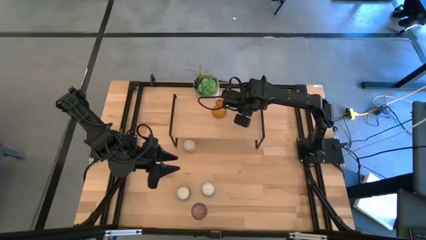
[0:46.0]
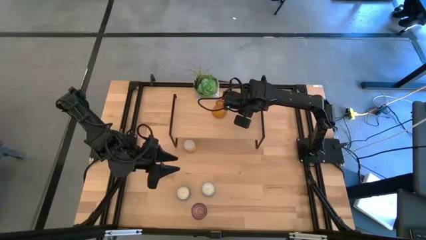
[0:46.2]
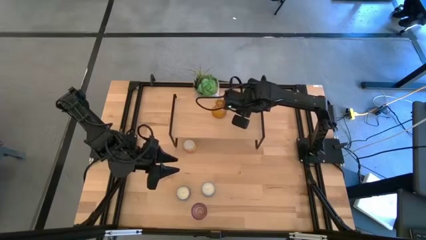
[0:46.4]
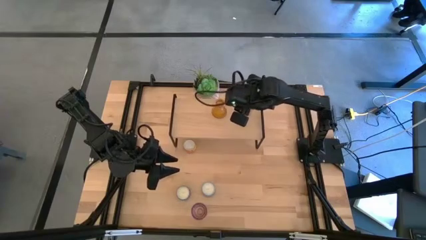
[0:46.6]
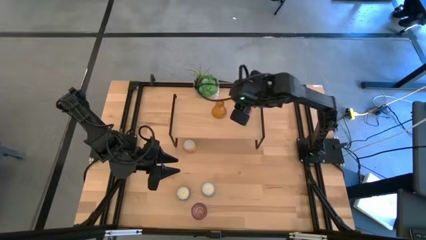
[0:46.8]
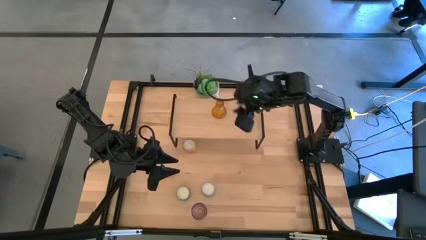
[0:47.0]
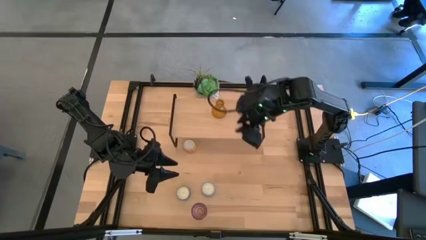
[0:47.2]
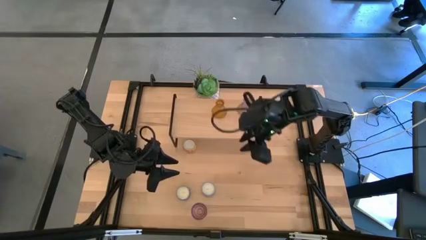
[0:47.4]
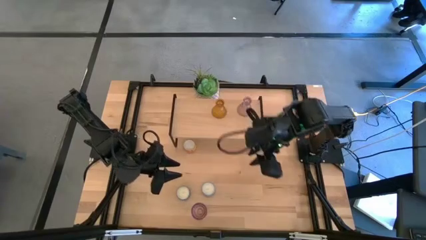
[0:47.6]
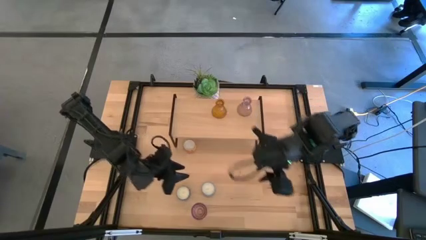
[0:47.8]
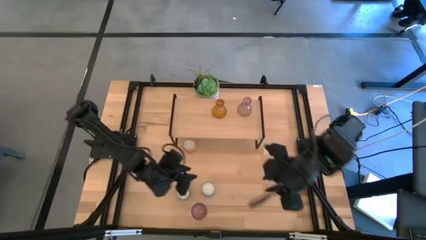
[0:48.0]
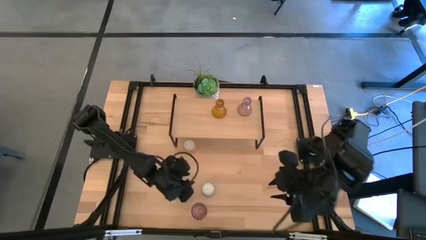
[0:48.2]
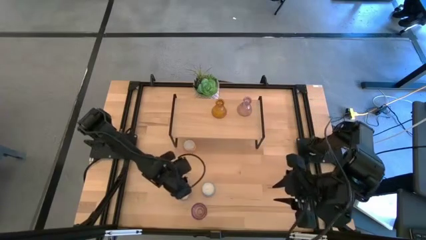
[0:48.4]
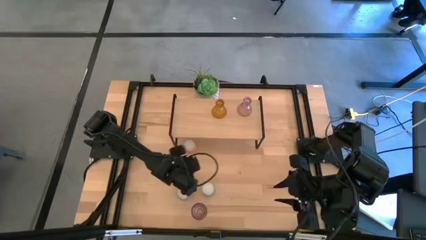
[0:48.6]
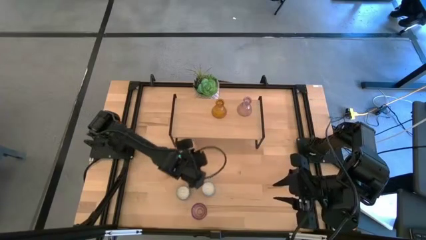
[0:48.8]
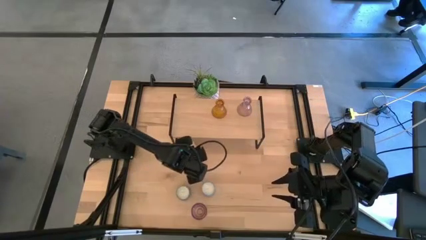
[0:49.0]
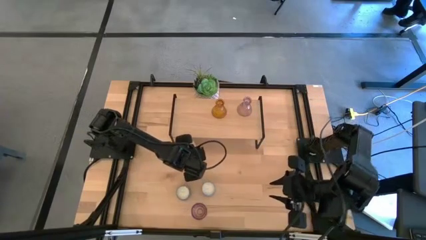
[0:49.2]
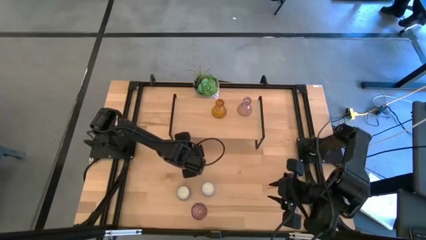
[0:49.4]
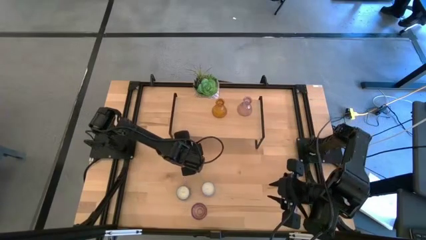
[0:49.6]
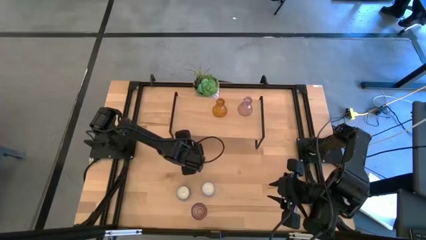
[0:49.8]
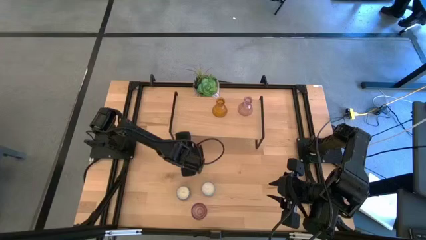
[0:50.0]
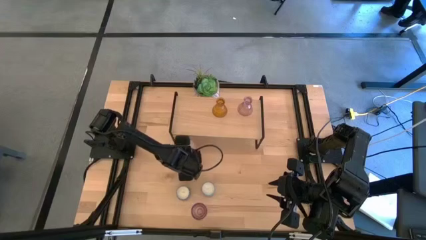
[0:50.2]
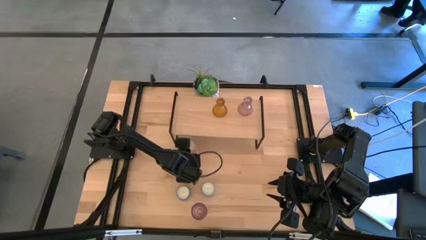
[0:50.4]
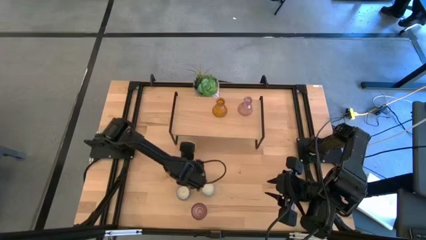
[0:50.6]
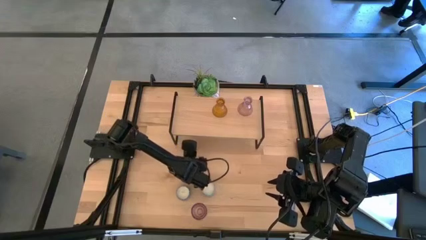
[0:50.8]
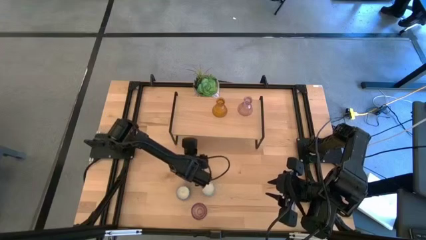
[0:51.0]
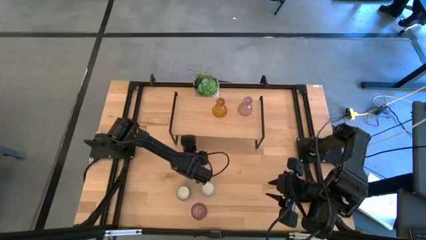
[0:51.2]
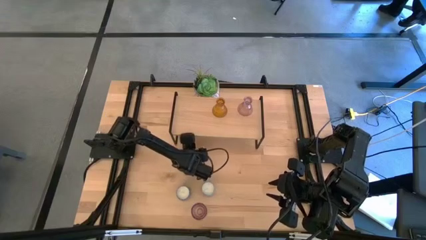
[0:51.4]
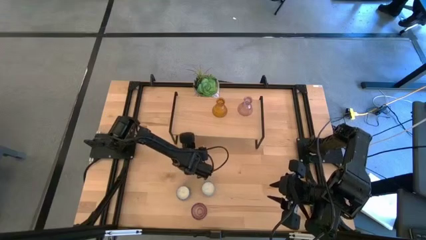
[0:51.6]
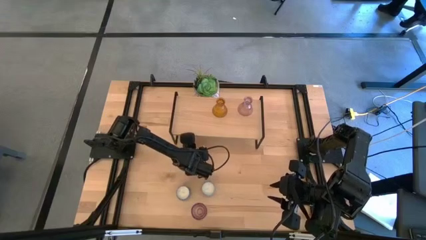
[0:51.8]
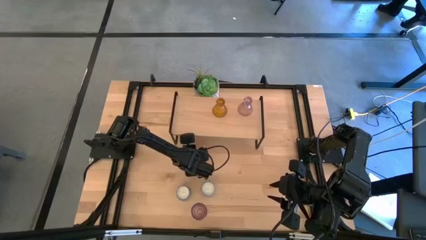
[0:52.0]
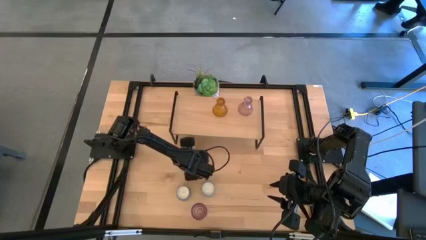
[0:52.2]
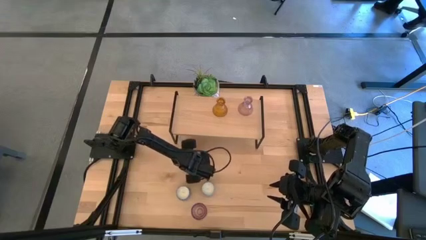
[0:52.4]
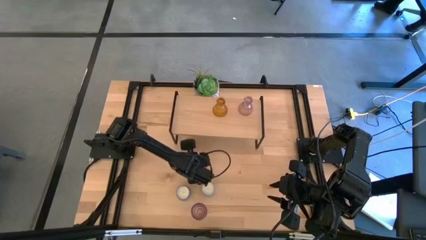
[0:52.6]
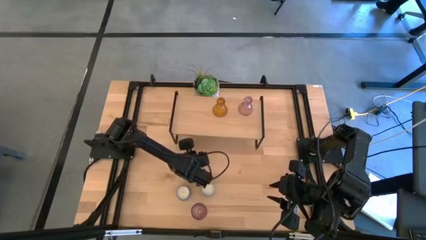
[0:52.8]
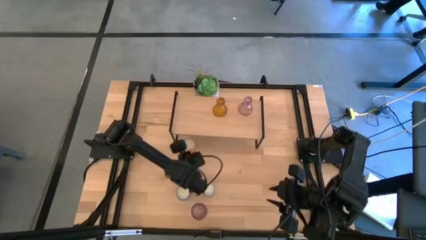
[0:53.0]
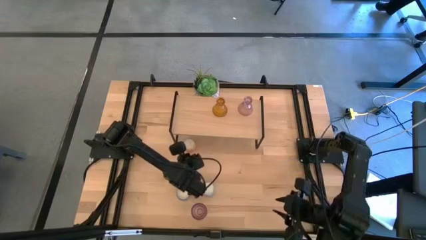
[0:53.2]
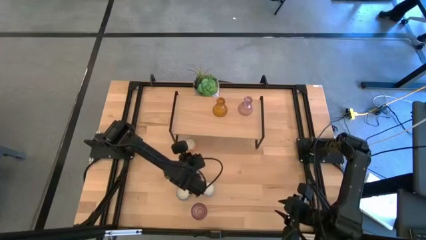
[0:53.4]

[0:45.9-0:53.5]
Task: Pick & Place candle stick holders
Put the orange candle on the shelf aligned with the orange candle holder

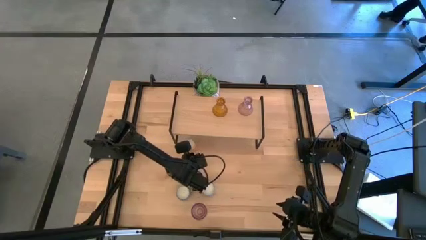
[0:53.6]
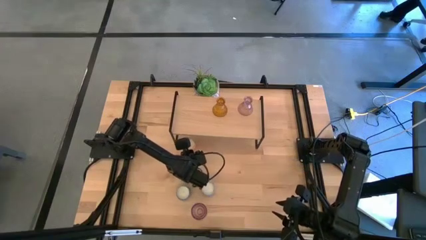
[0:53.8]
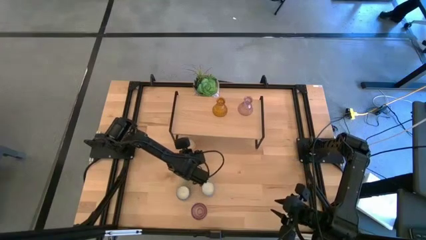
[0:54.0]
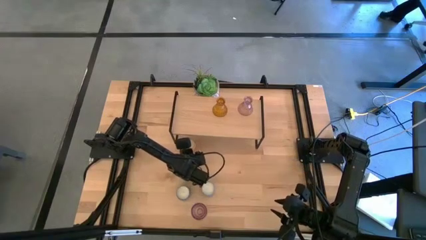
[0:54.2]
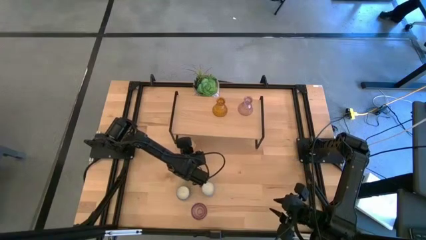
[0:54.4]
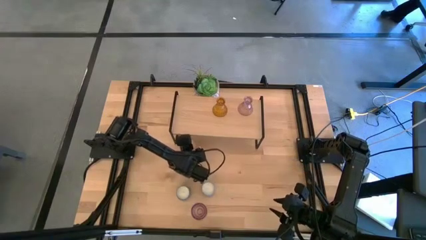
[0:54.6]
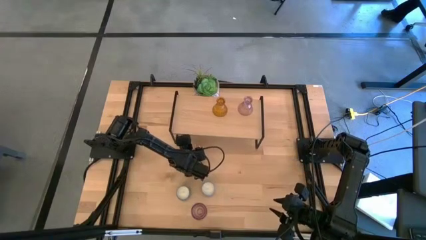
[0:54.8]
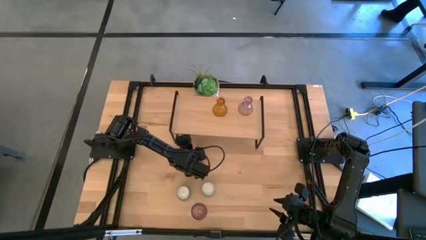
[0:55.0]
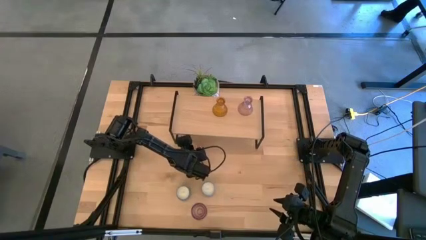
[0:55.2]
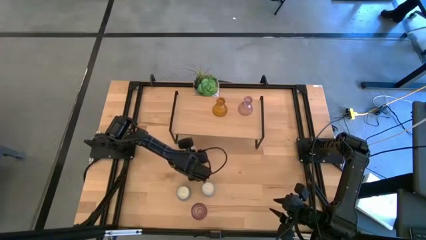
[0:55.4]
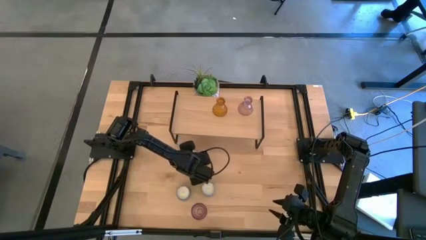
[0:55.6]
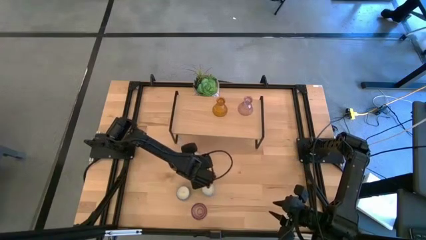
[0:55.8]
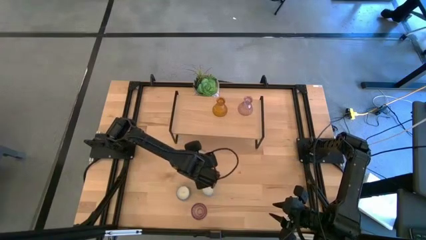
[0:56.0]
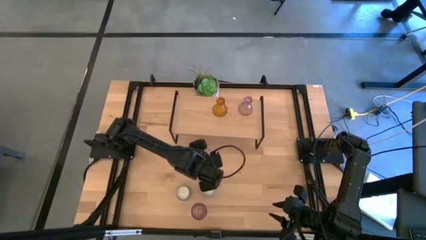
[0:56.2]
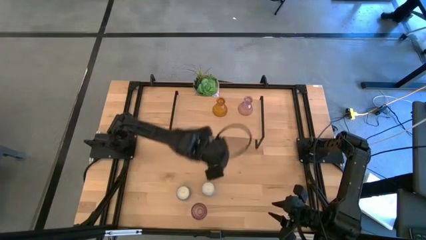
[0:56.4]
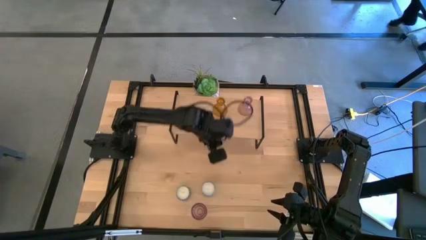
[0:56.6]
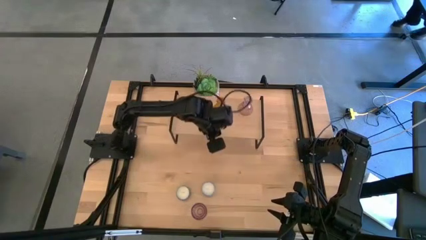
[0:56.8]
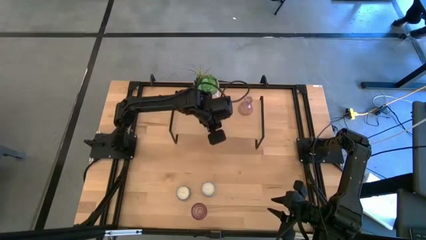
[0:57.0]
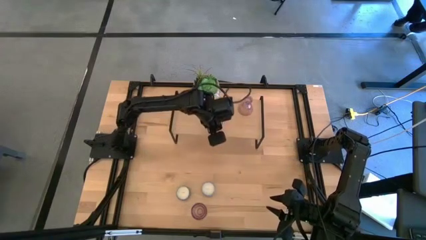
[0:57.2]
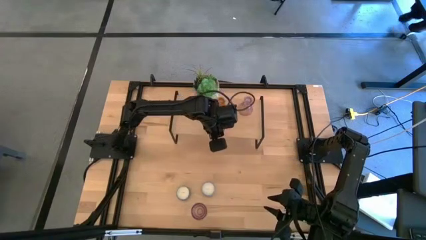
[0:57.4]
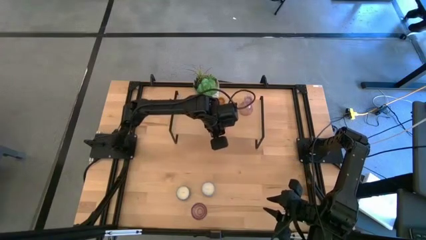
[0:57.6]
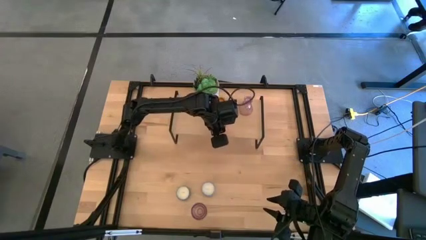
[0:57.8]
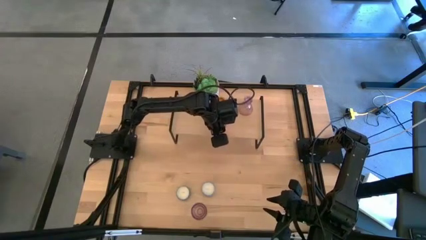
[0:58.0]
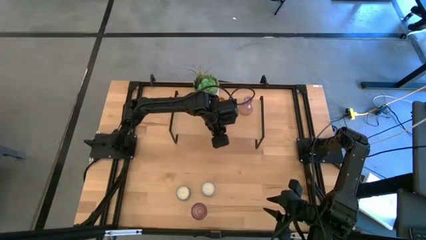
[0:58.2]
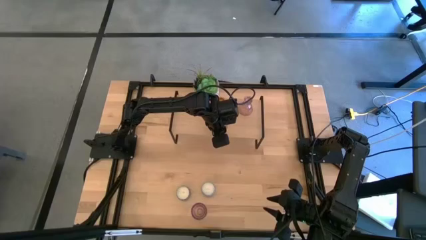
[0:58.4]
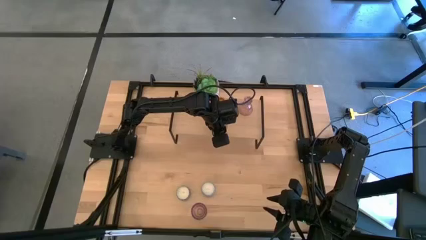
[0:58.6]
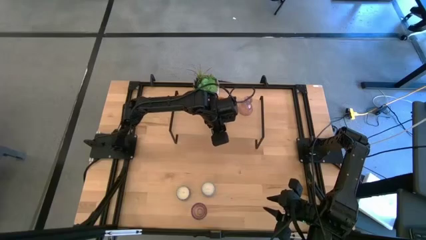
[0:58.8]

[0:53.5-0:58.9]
Put the orange candle on the shelf aligned with the orange candle holder
